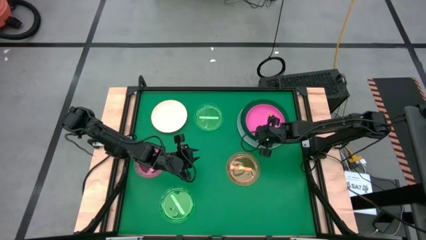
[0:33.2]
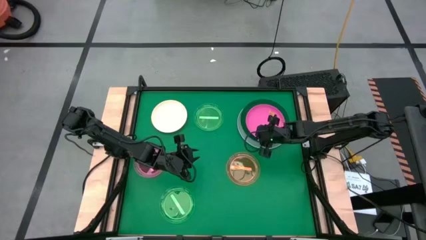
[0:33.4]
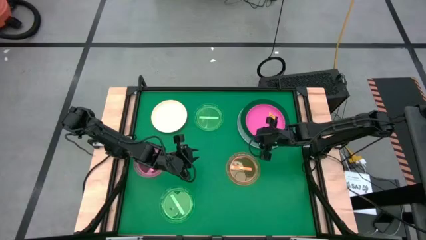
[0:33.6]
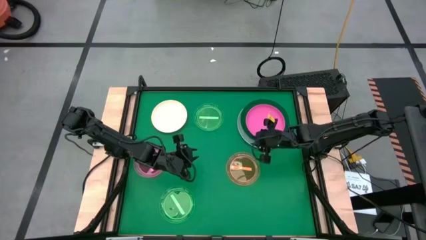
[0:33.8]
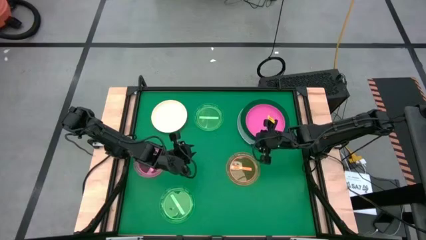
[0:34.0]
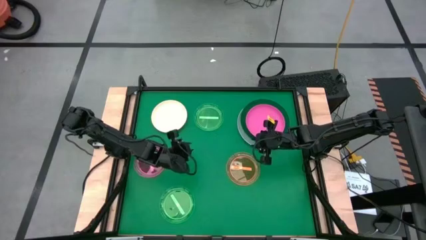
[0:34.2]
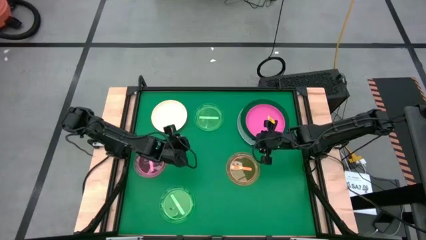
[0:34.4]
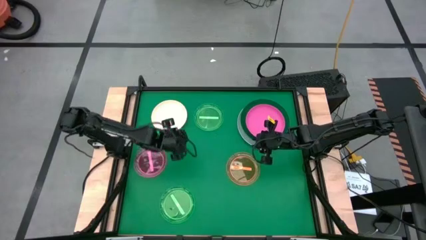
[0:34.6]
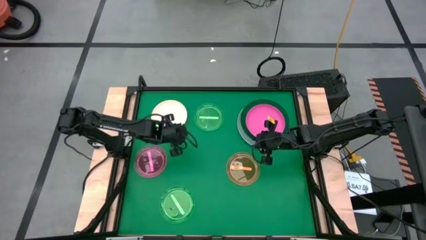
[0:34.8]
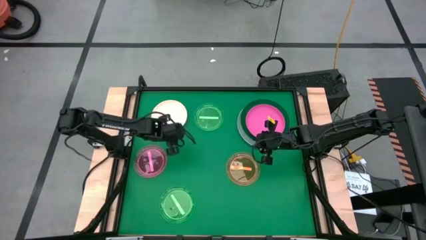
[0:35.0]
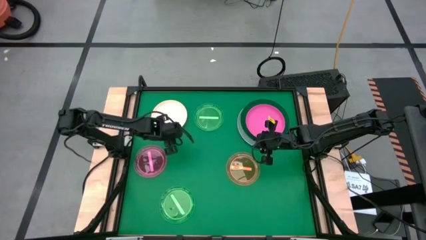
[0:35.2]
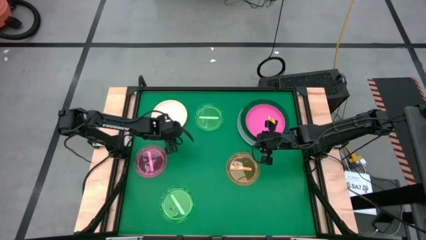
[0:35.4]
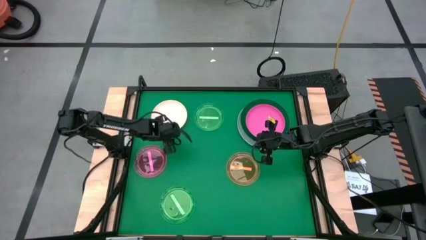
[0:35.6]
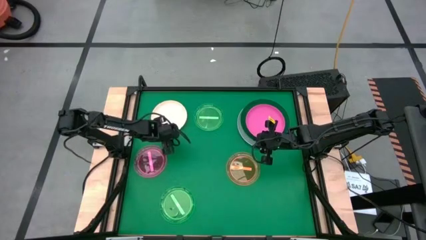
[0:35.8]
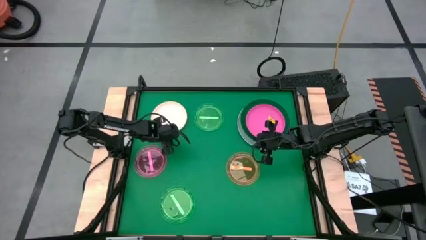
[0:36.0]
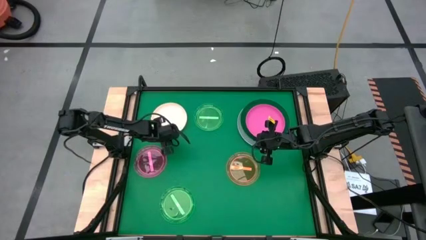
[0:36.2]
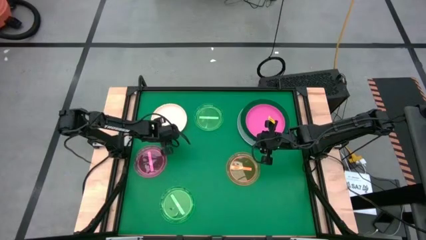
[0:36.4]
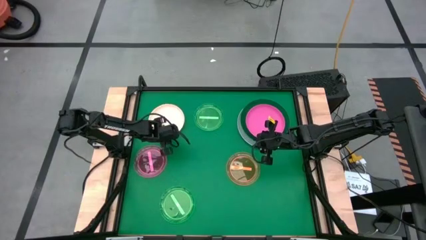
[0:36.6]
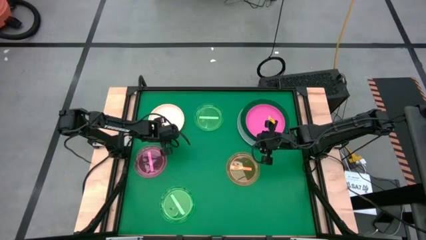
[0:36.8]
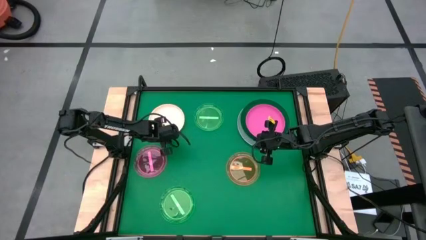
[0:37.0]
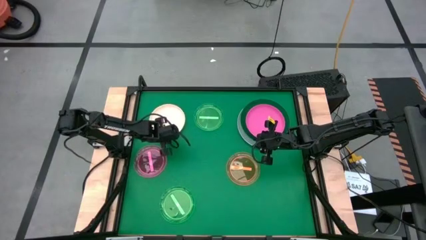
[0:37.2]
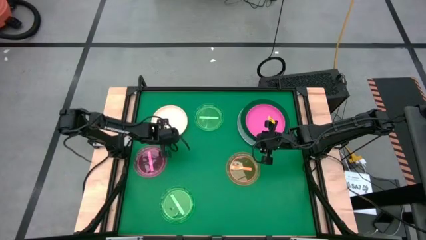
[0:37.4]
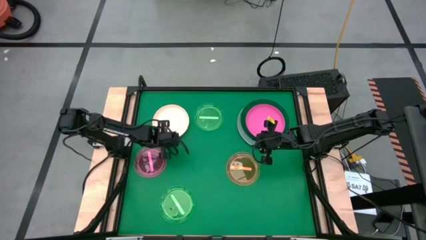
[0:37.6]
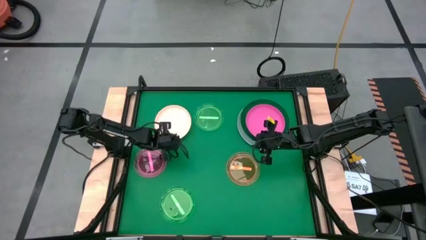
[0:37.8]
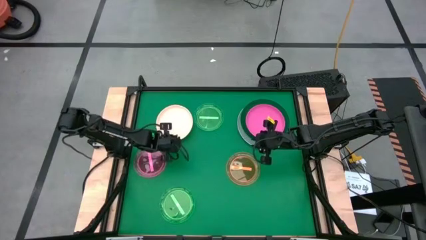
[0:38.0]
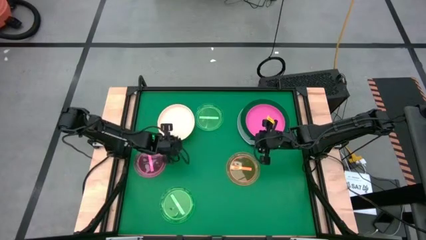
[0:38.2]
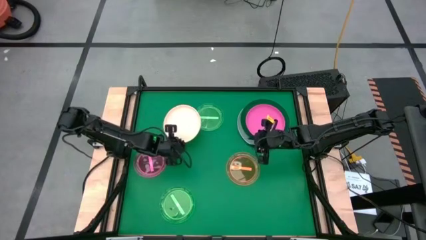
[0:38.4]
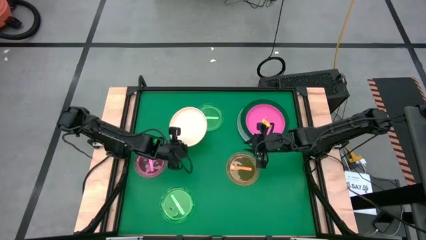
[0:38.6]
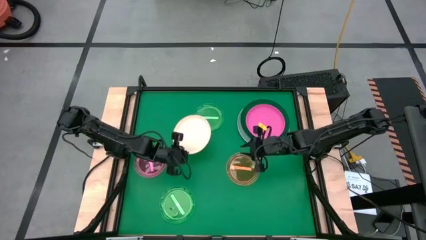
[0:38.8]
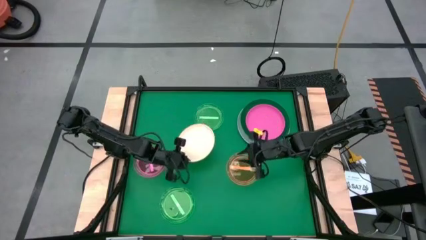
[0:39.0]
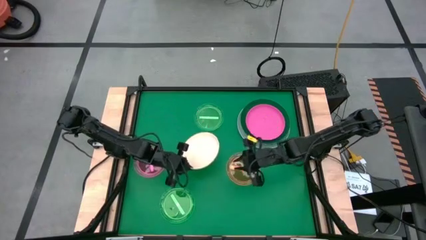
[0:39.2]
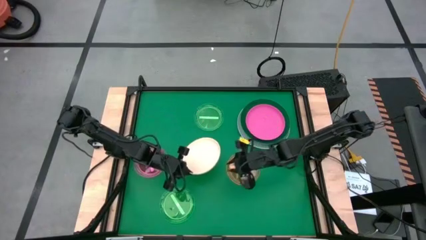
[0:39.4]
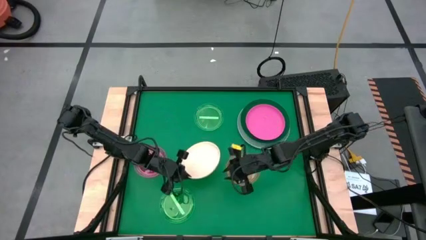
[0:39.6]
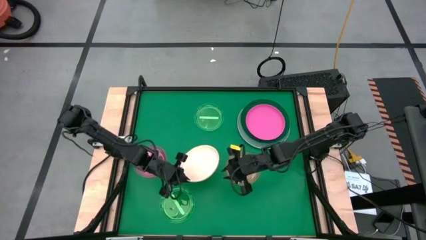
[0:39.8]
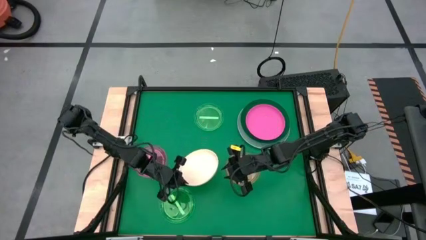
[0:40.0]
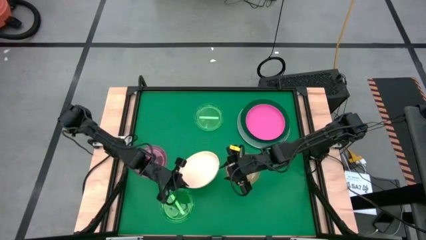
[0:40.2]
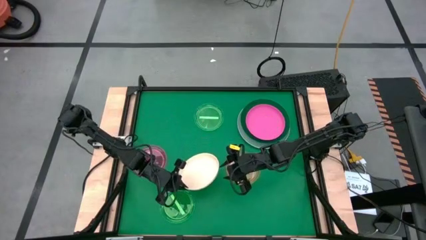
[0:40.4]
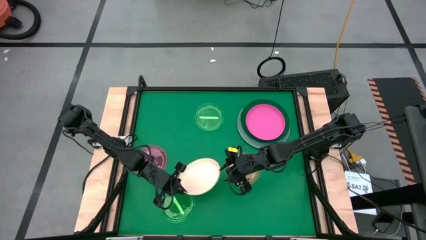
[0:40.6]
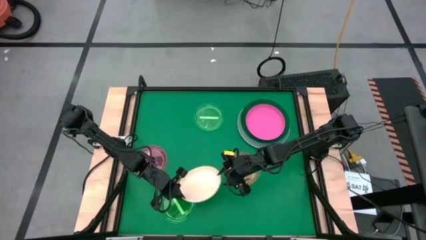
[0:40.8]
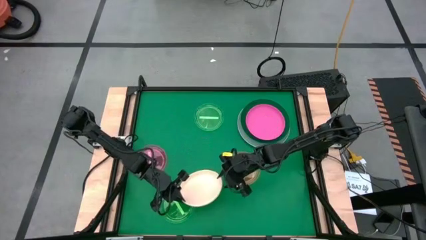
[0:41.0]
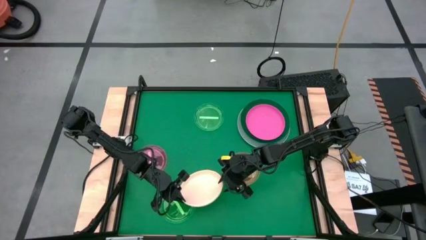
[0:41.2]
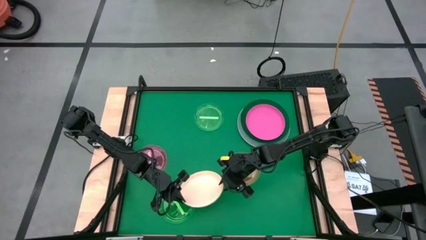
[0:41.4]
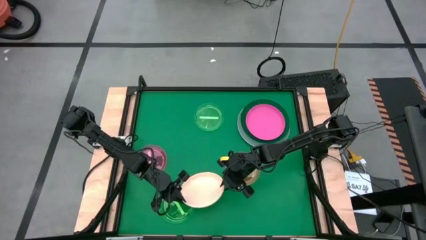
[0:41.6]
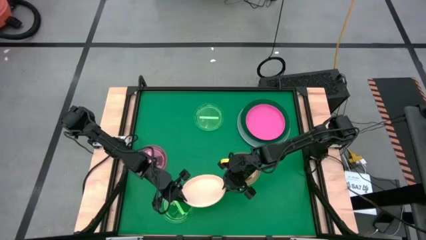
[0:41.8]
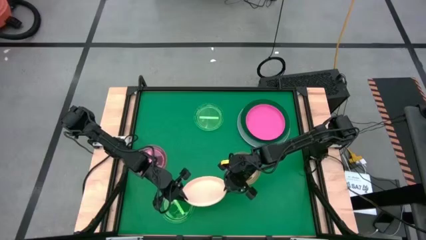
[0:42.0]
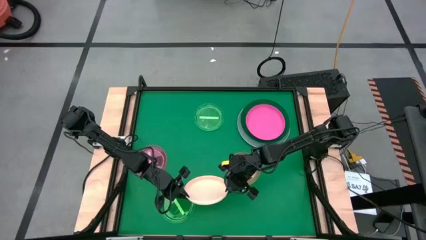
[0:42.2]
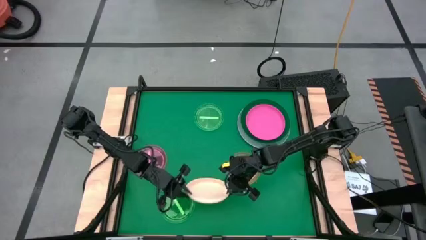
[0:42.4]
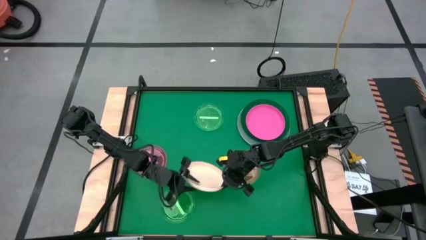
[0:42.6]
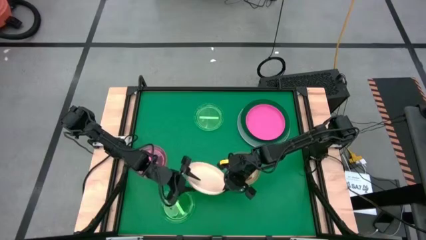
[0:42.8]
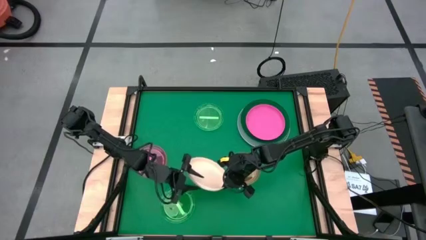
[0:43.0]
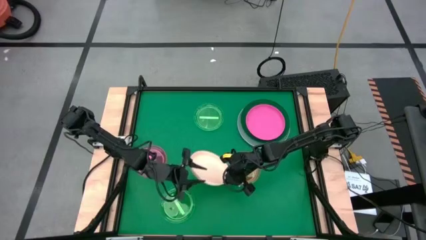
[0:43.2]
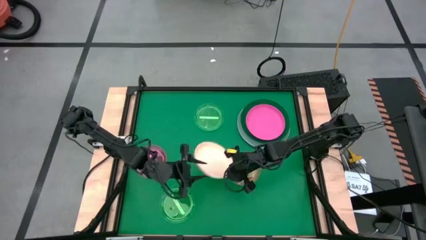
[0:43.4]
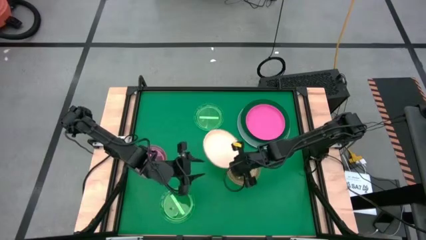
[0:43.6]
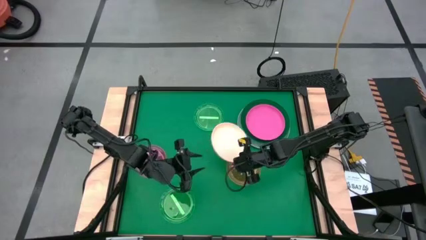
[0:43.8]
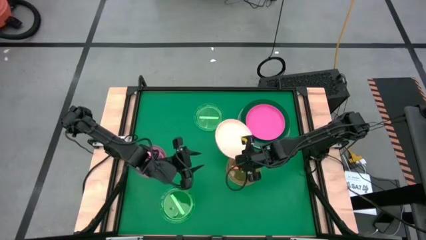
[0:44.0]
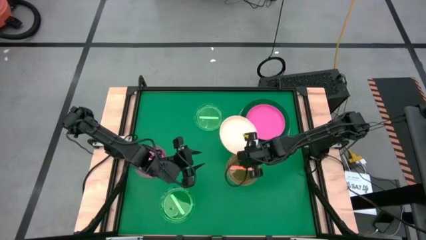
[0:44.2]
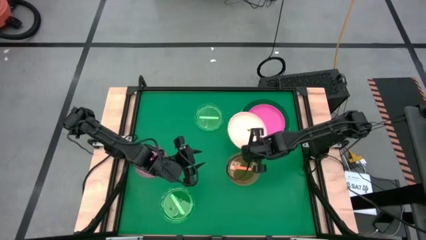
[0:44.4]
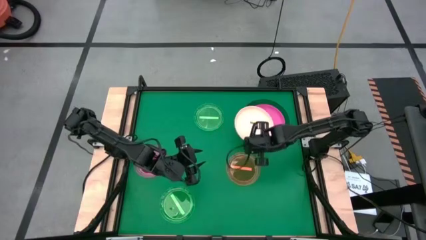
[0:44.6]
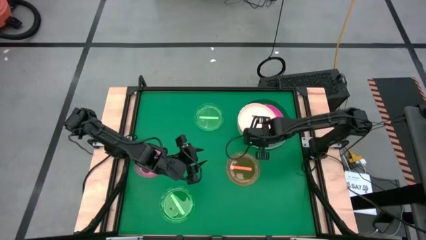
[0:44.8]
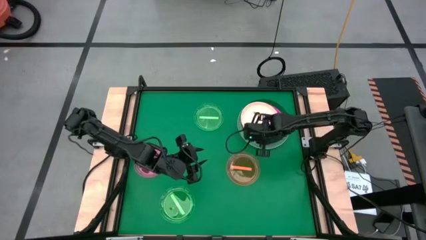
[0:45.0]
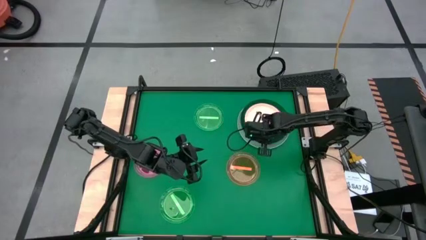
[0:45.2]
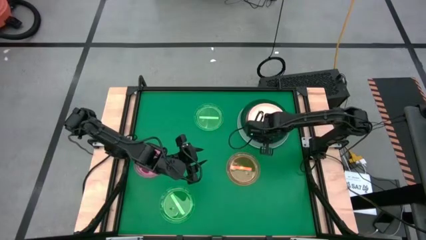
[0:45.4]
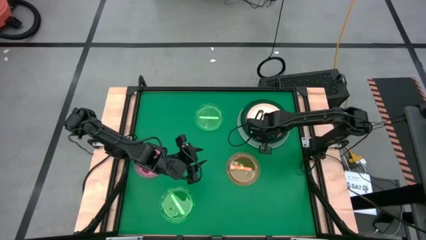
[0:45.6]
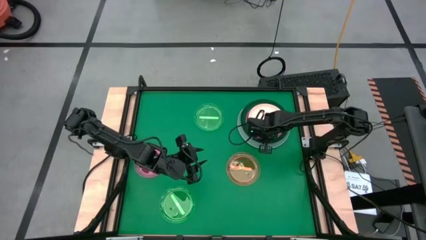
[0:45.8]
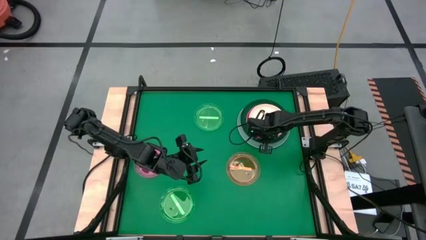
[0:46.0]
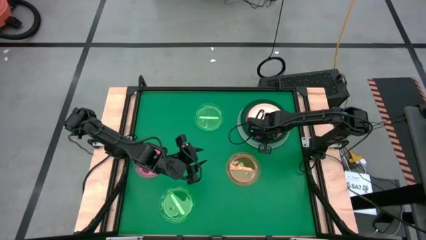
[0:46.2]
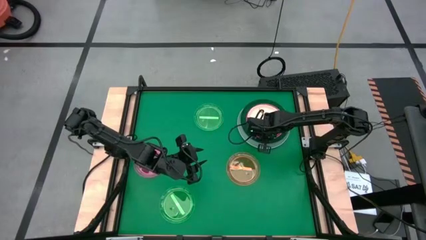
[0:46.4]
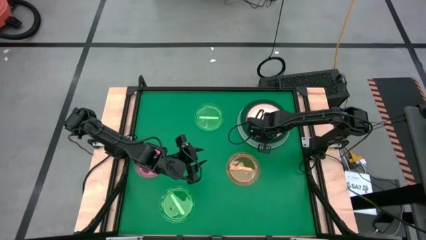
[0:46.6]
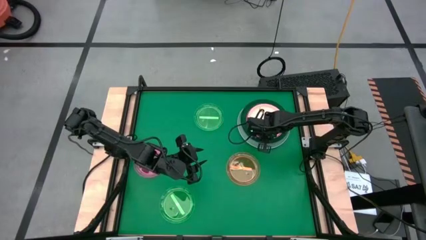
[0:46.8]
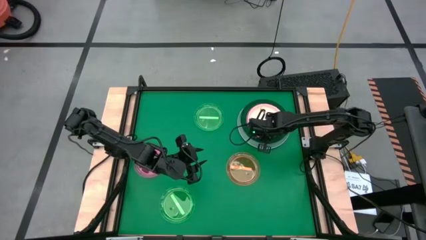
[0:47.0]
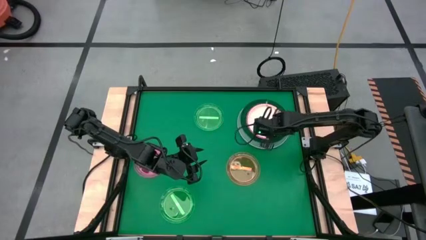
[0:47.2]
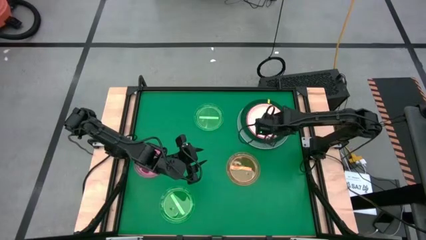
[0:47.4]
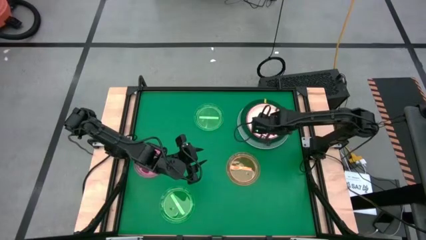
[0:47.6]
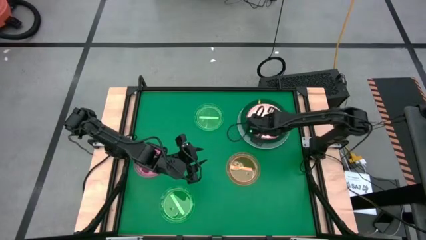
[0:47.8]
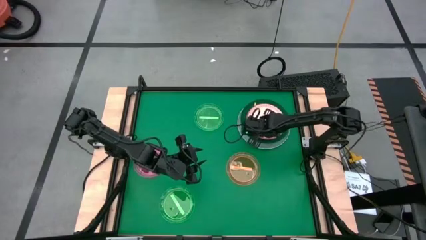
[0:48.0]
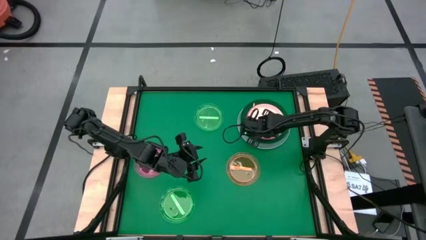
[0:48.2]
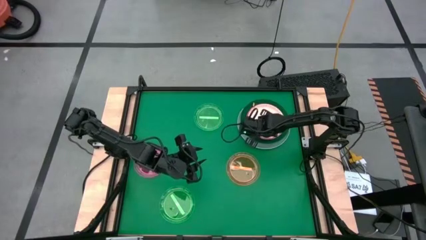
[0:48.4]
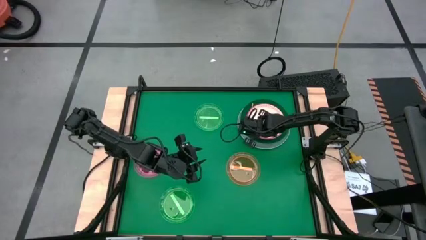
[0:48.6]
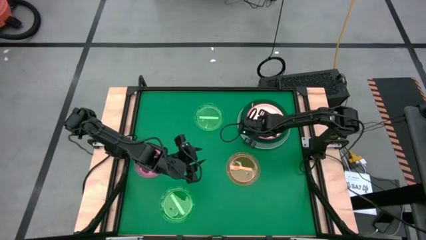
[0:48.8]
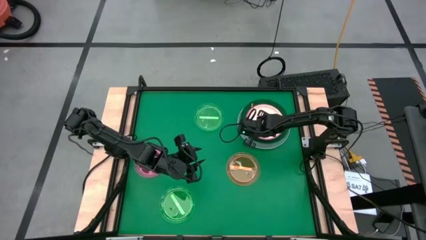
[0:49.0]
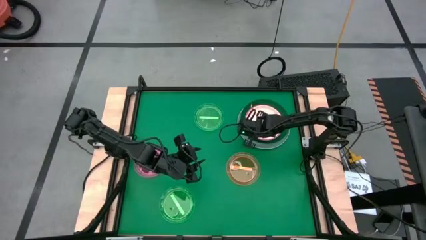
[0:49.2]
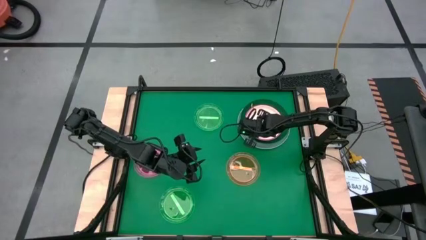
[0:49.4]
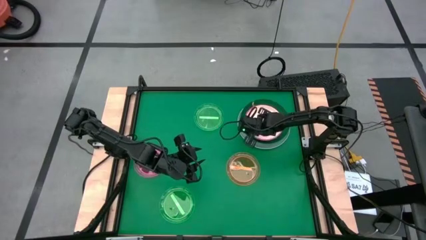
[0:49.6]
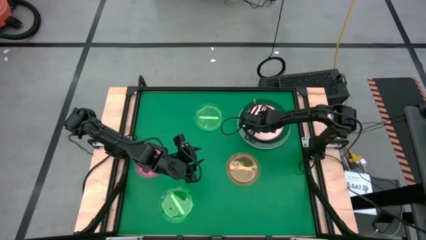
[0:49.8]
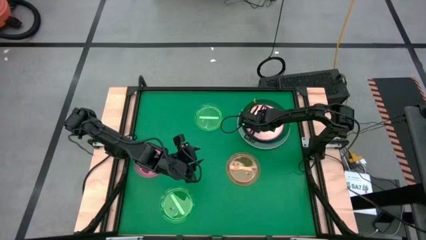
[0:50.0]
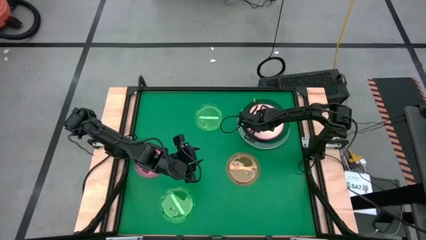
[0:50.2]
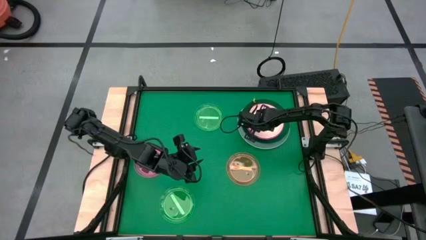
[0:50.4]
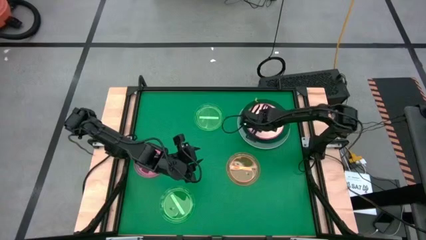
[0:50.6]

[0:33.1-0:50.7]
Task: Stack plastic plates
Stack the white plate on the pink plate
